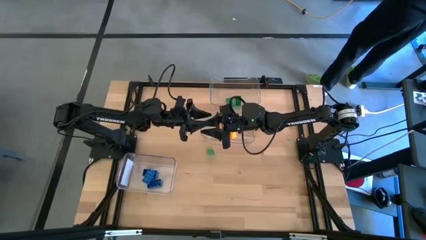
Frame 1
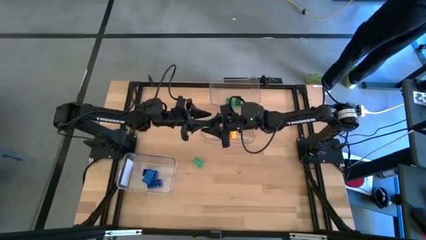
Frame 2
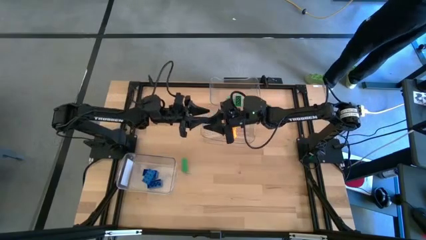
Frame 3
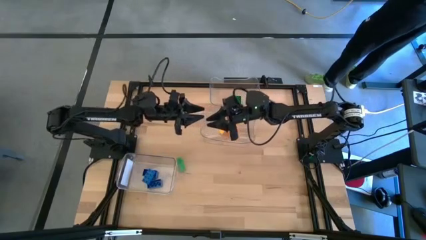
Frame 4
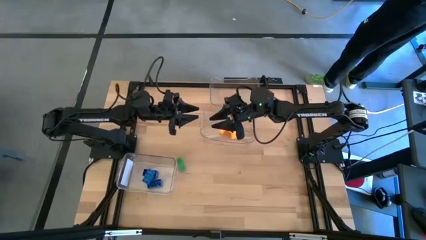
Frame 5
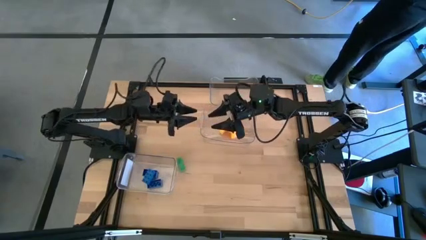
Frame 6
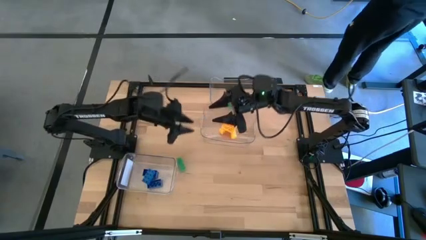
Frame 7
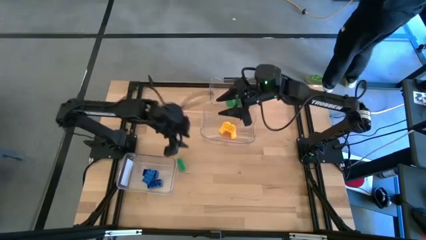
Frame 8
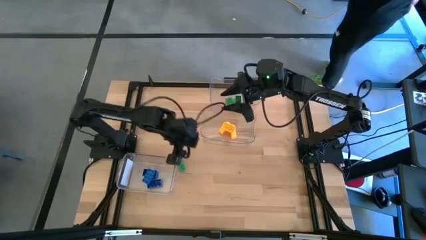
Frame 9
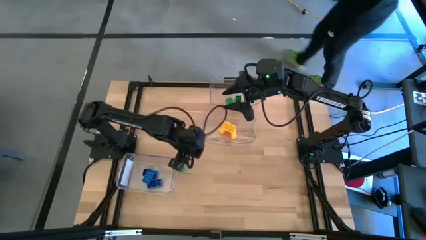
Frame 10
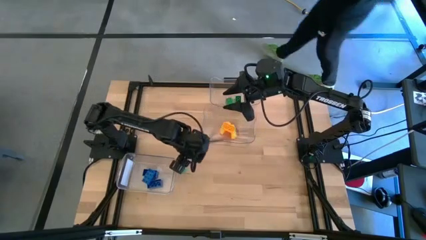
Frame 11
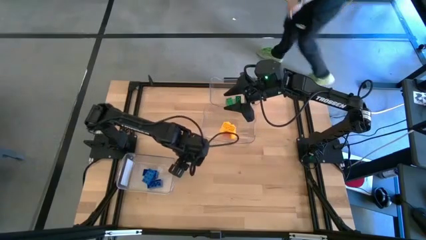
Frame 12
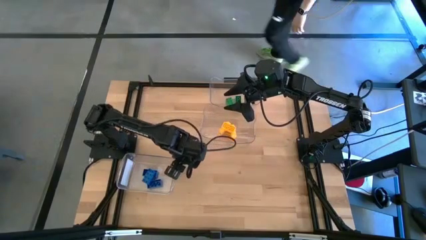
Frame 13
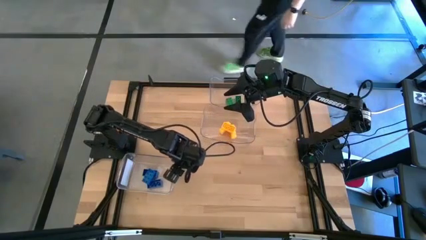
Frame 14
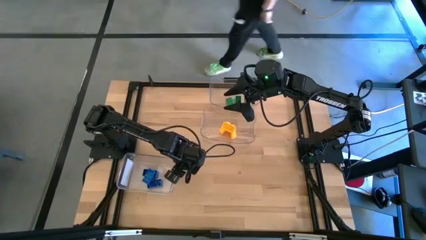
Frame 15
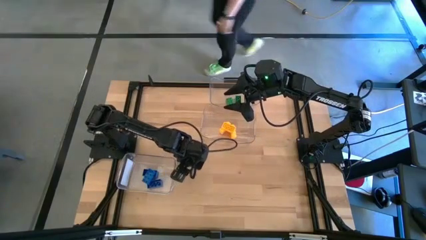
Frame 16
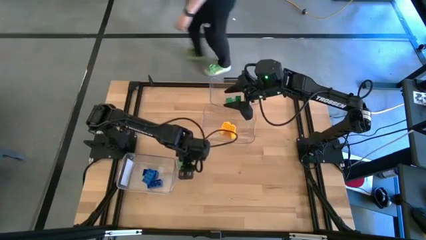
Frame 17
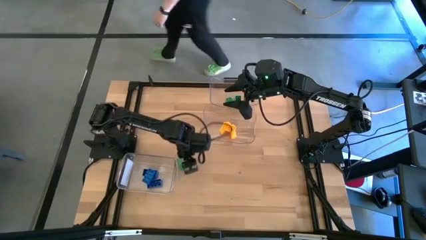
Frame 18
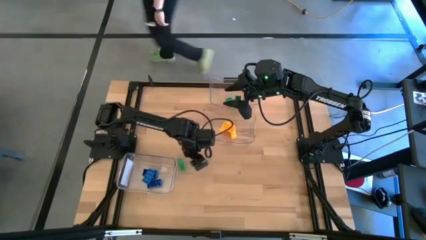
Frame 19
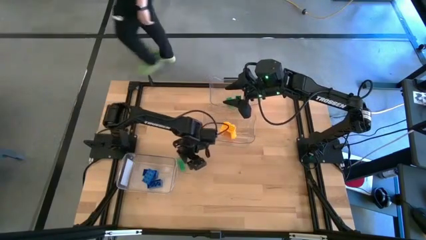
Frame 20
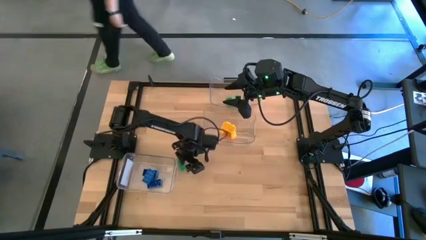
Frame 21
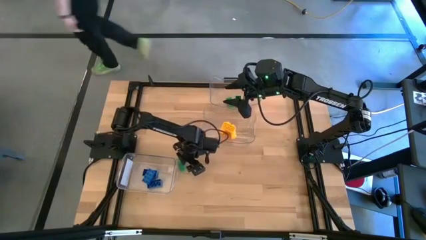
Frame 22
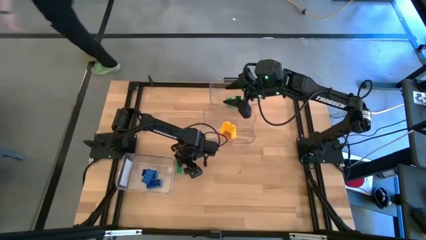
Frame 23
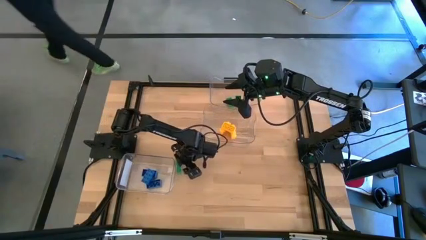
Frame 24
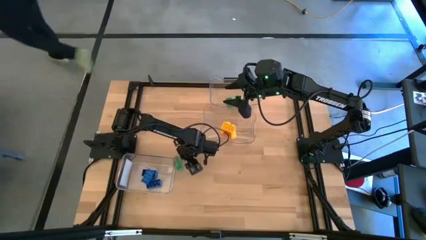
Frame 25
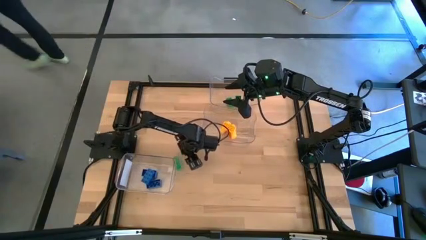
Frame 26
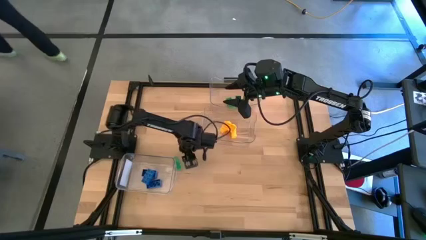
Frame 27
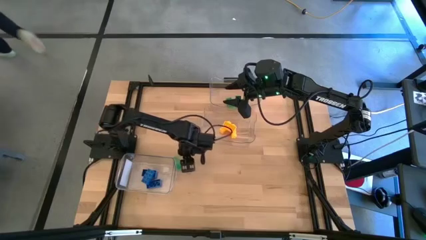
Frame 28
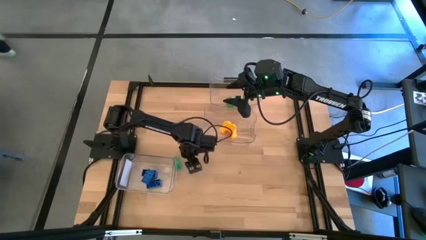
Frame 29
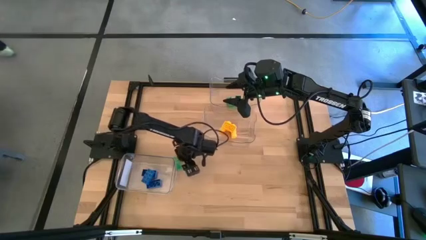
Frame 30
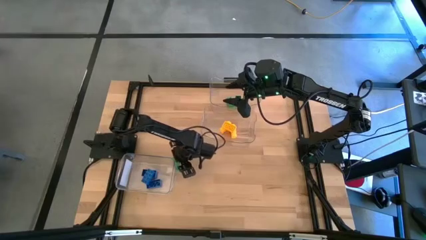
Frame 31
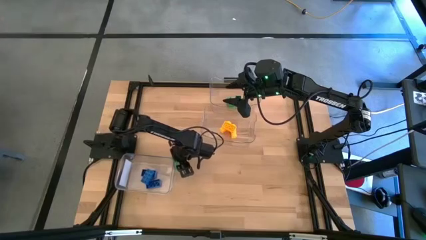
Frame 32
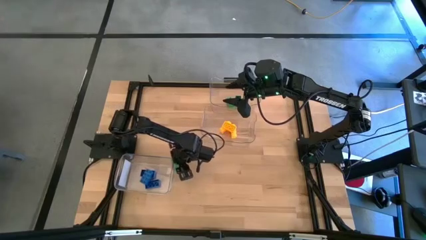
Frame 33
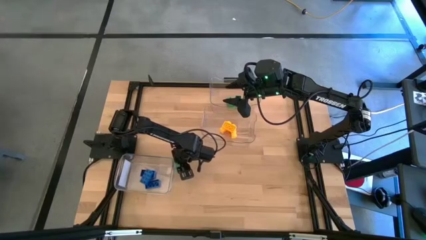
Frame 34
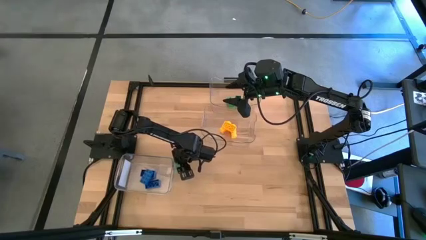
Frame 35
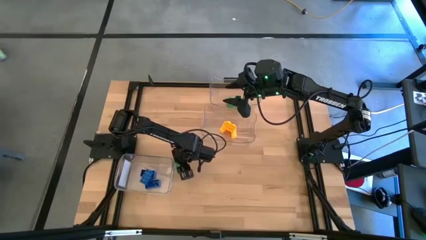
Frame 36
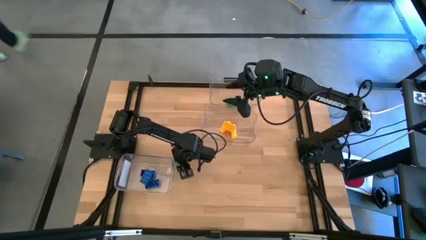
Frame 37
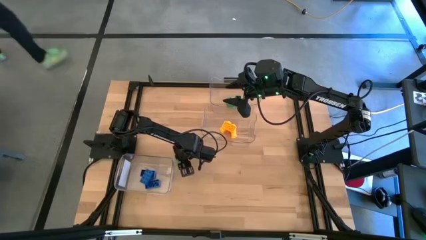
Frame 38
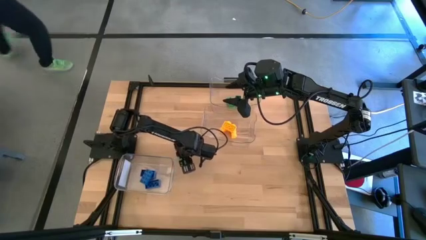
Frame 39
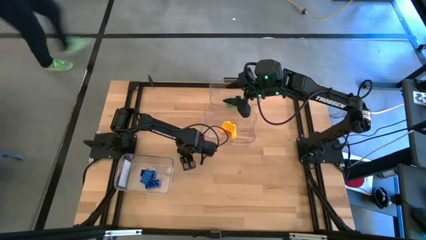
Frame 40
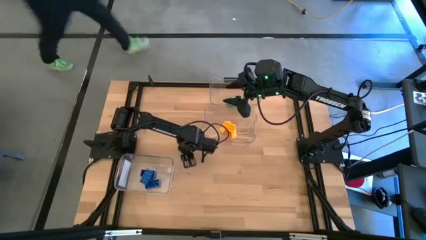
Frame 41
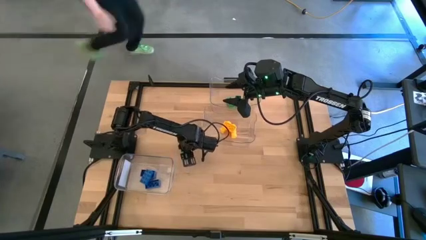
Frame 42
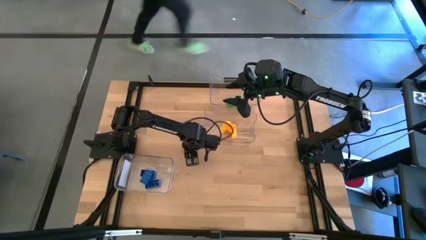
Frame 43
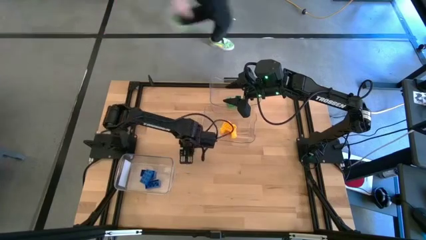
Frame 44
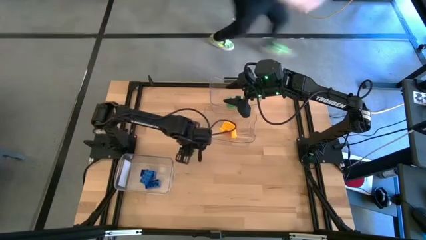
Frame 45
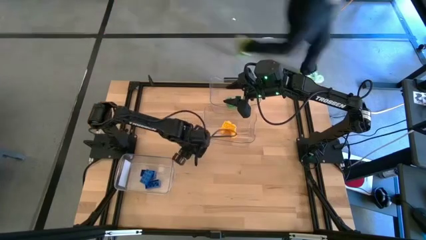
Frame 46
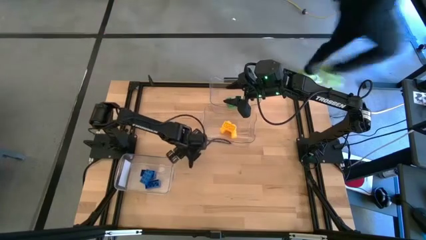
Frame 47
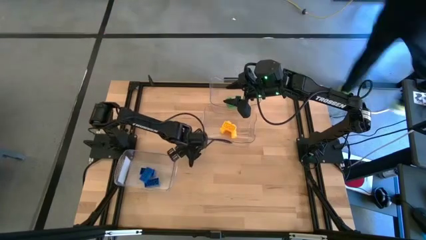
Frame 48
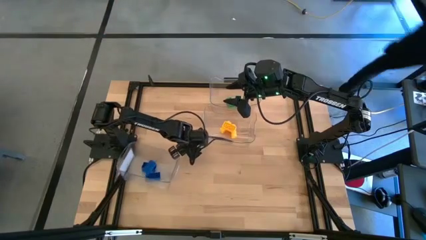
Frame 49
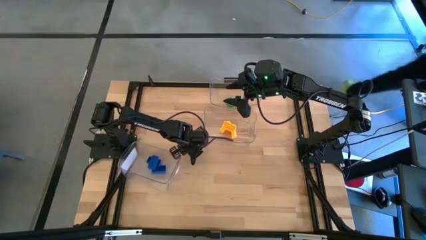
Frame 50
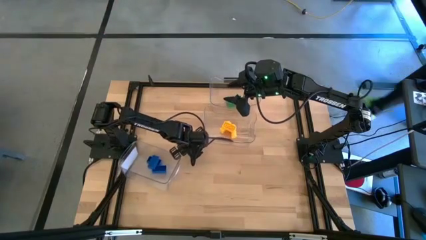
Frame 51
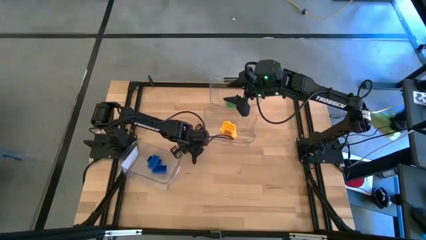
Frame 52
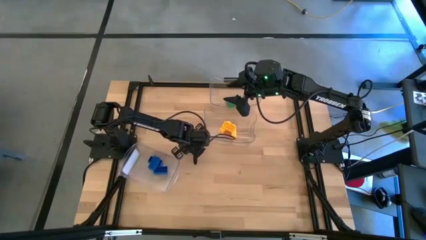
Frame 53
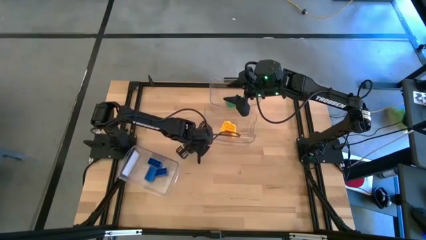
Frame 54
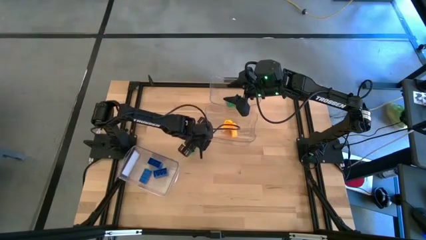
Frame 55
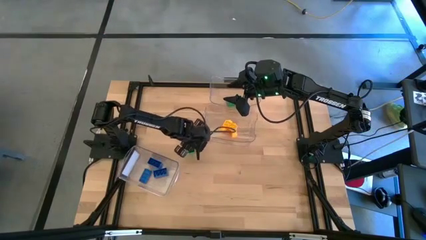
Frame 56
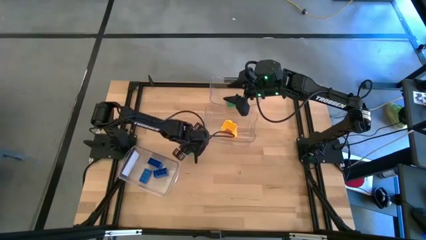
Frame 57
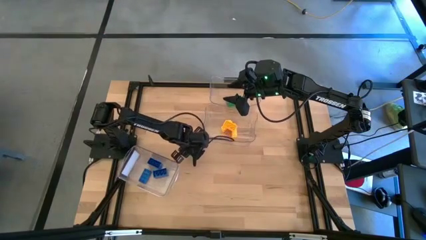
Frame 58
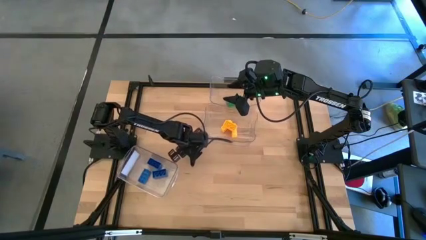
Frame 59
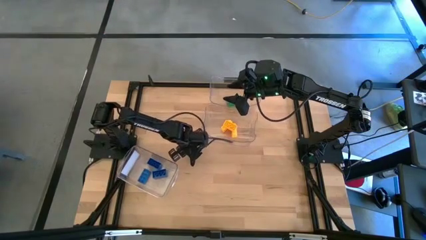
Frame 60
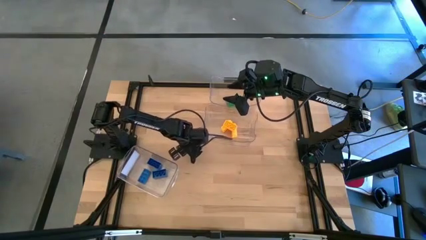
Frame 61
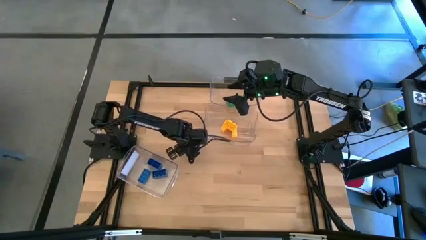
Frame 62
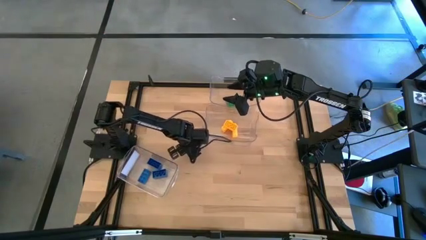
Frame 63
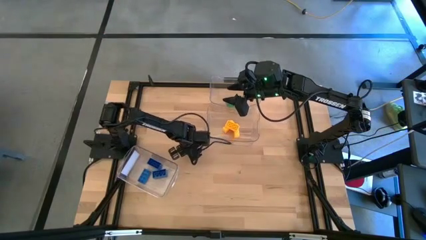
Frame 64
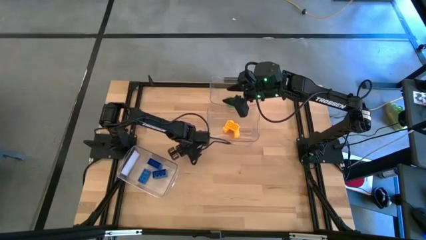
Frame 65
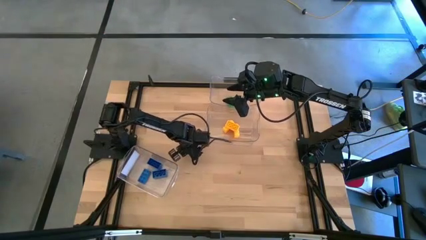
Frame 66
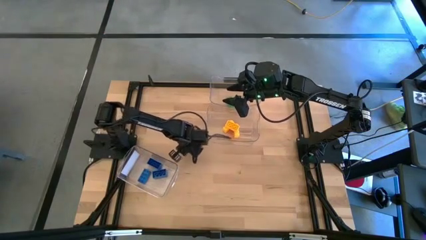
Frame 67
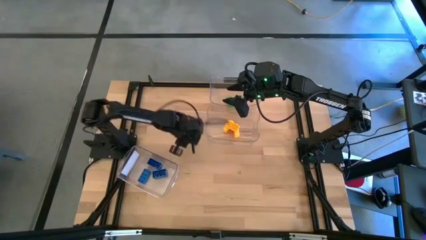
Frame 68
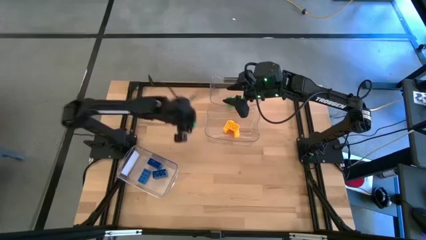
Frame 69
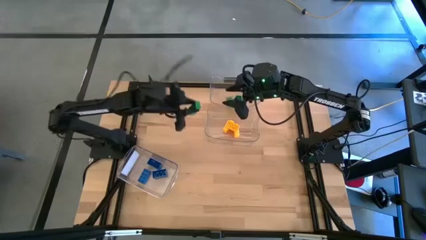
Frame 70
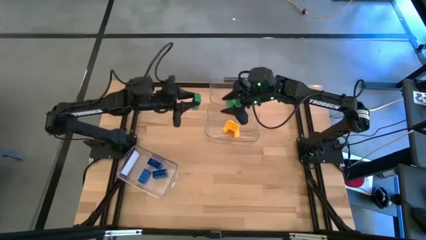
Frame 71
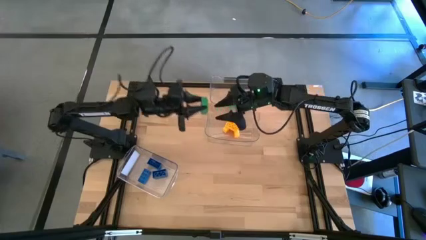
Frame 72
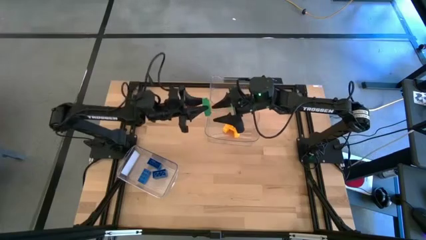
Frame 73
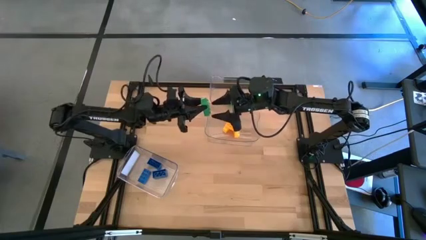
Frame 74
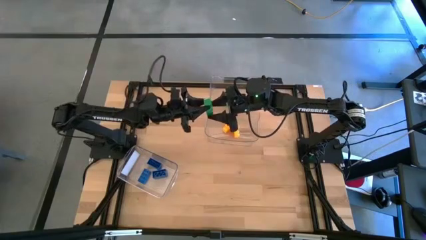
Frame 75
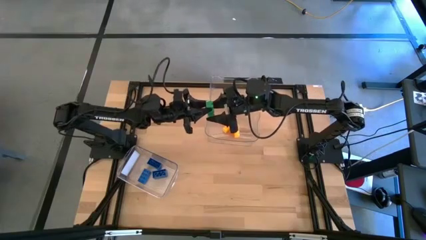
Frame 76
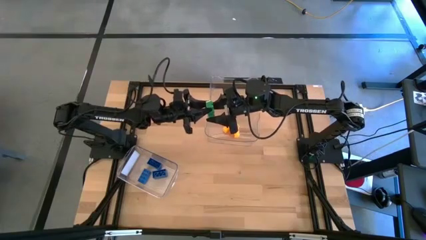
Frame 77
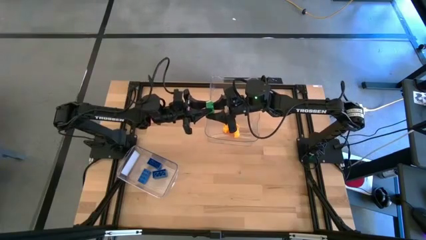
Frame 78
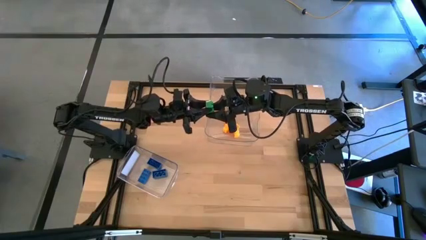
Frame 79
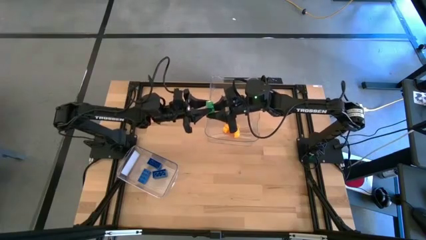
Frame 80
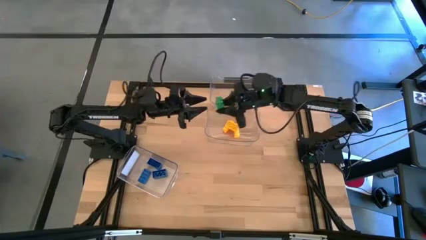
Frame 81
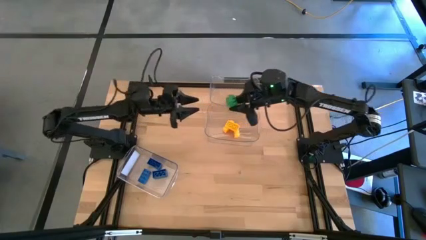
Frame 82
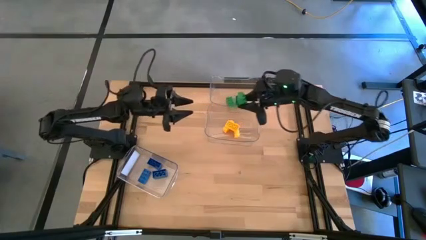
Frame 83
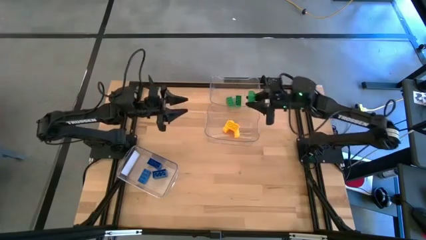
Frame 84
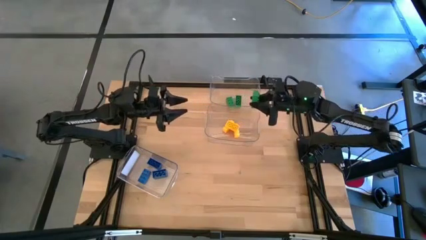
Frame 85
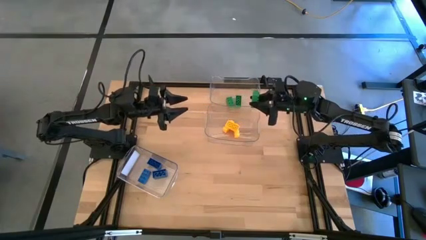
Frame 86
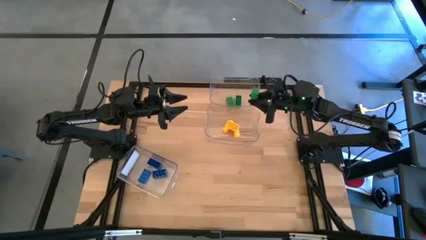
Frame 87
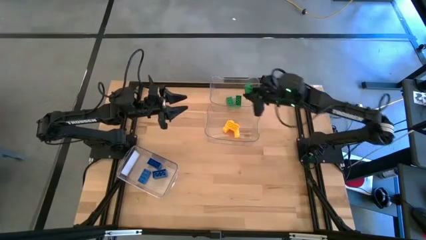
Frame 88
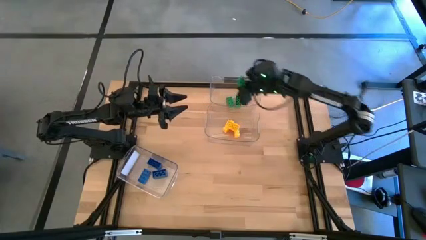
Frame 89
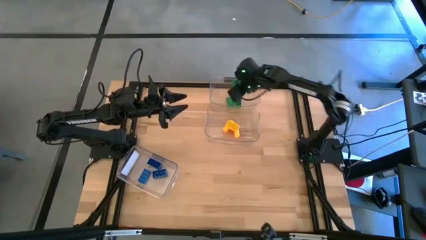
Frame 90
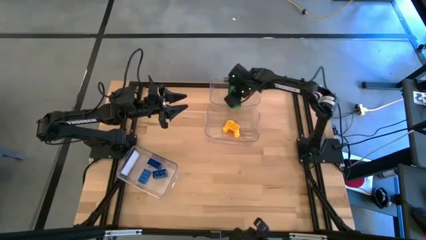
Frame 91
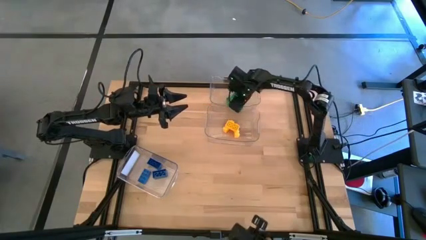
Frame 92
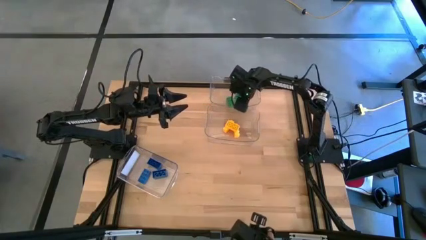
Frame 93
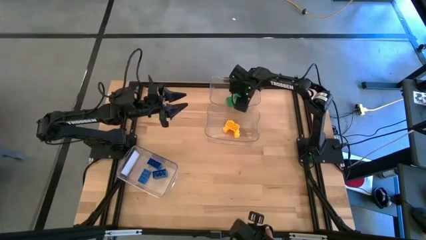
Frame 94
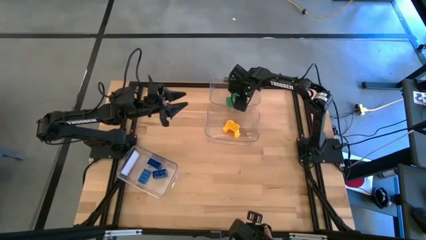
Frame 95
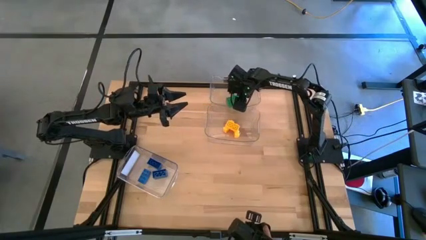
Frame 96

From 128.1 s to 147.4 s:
Task: Sort & place blocks by color
Put the green game piece into the top transparent bin
